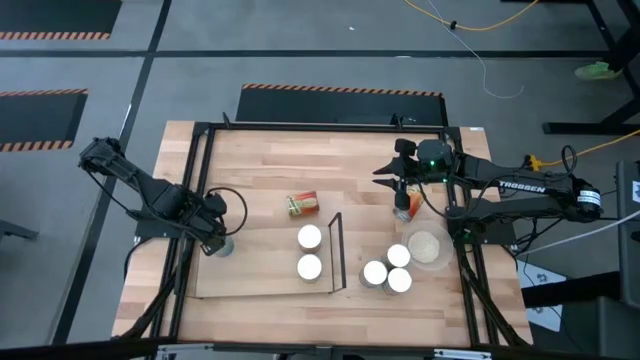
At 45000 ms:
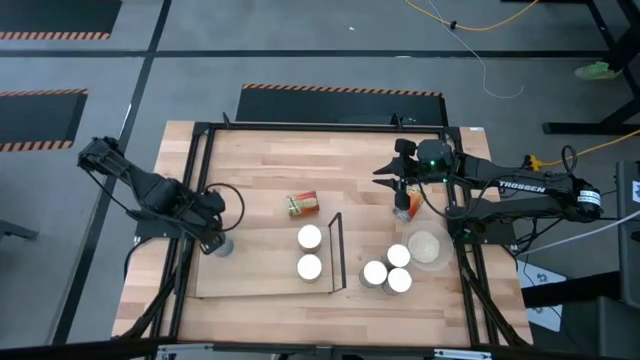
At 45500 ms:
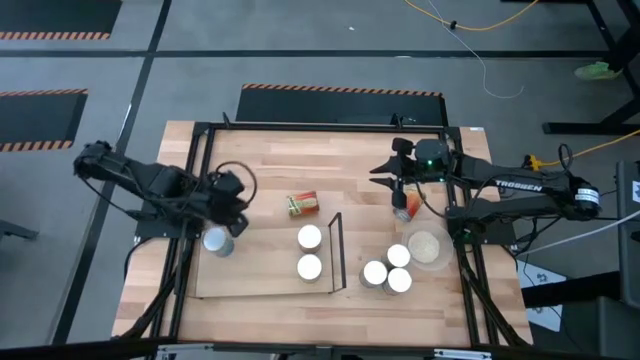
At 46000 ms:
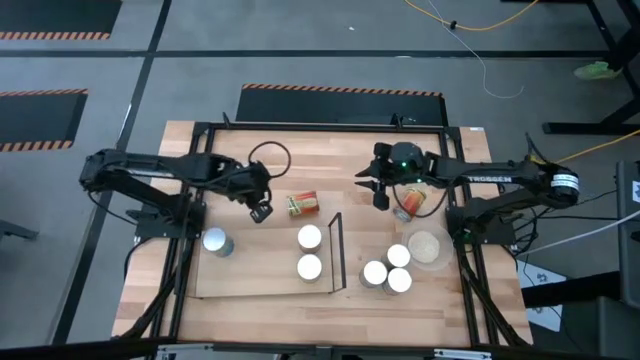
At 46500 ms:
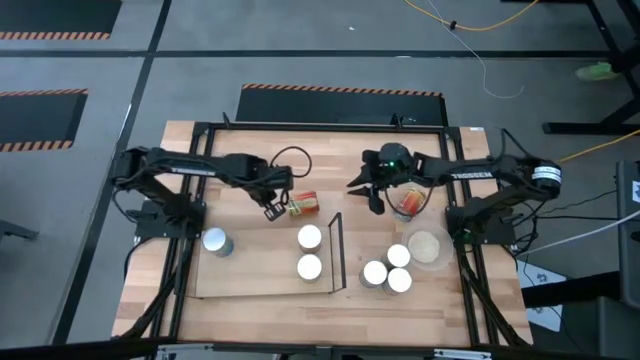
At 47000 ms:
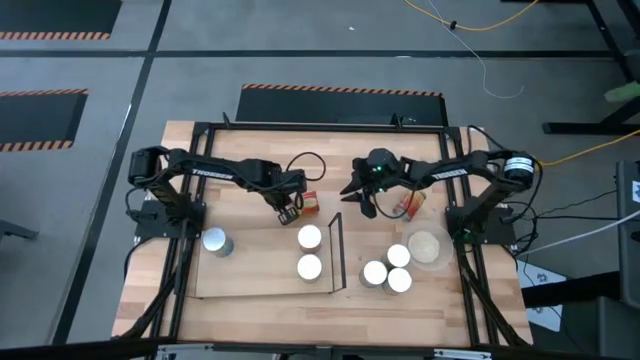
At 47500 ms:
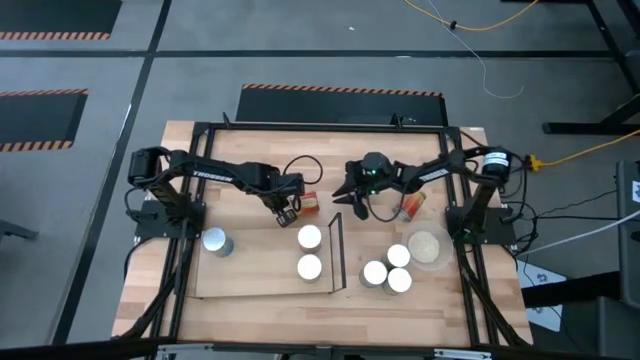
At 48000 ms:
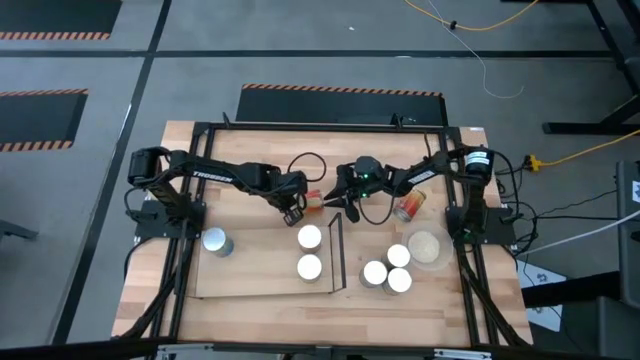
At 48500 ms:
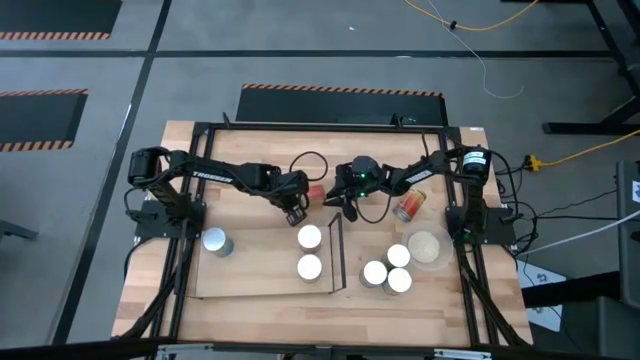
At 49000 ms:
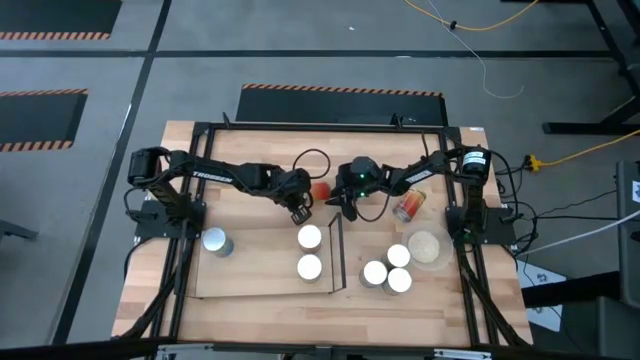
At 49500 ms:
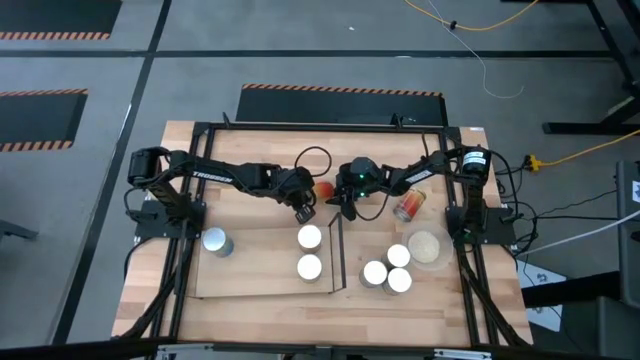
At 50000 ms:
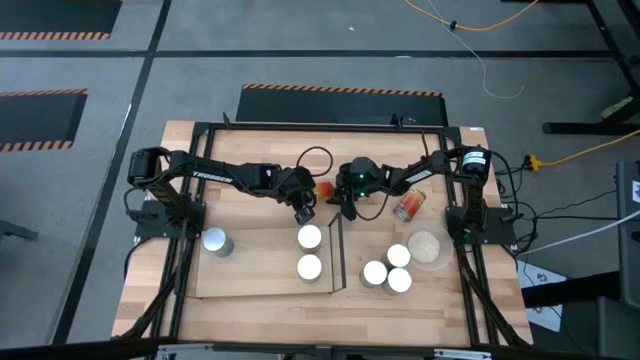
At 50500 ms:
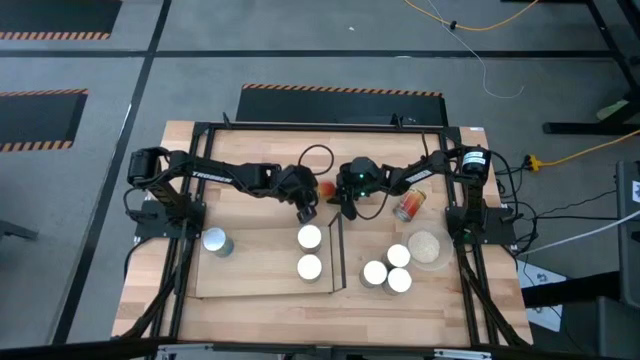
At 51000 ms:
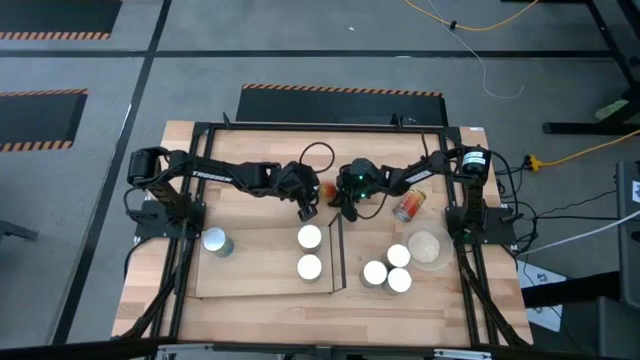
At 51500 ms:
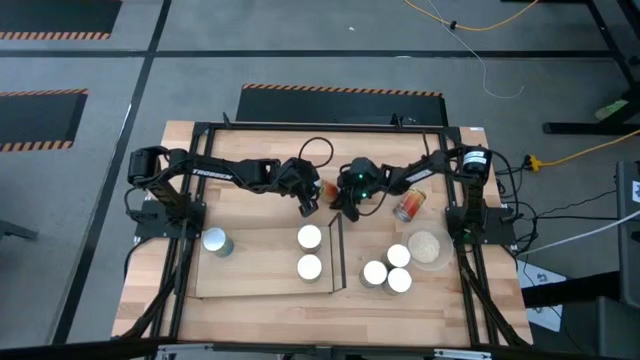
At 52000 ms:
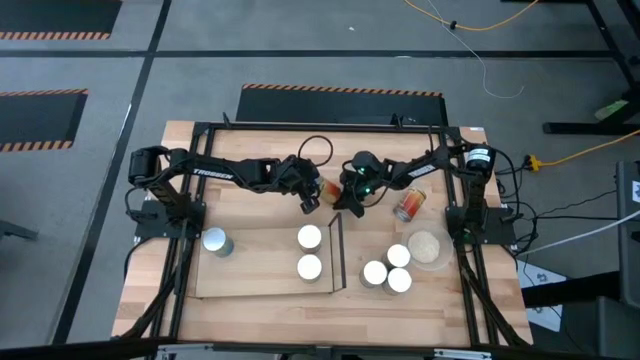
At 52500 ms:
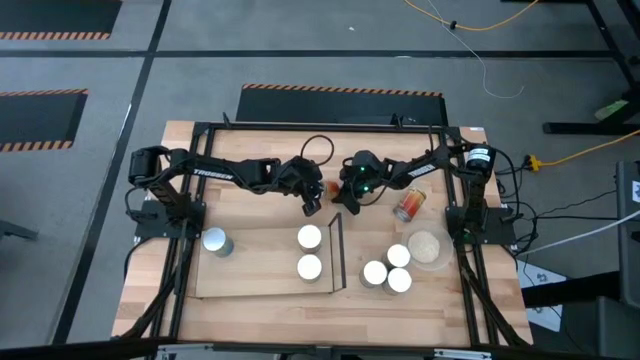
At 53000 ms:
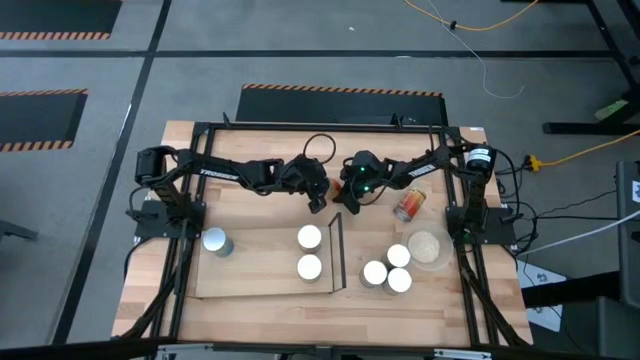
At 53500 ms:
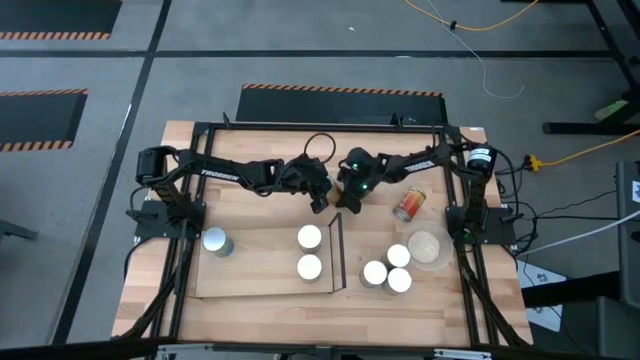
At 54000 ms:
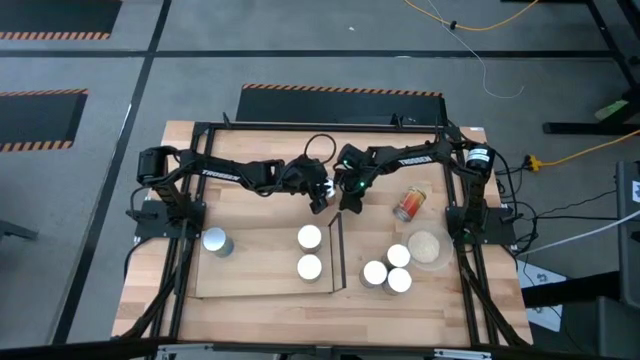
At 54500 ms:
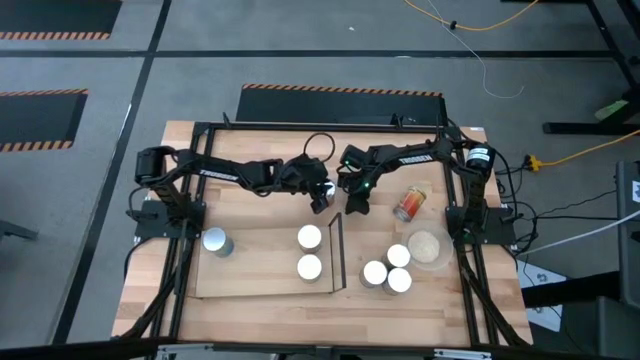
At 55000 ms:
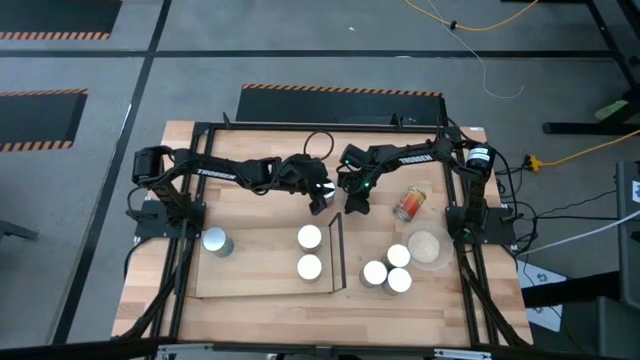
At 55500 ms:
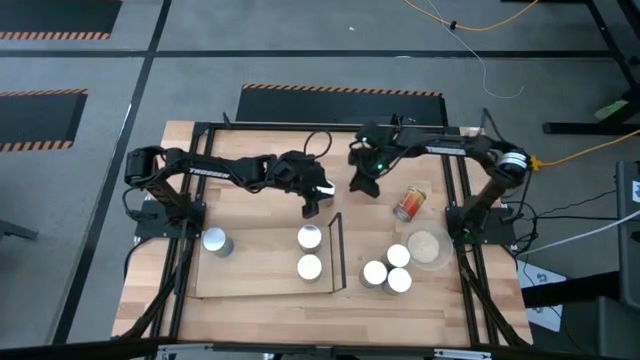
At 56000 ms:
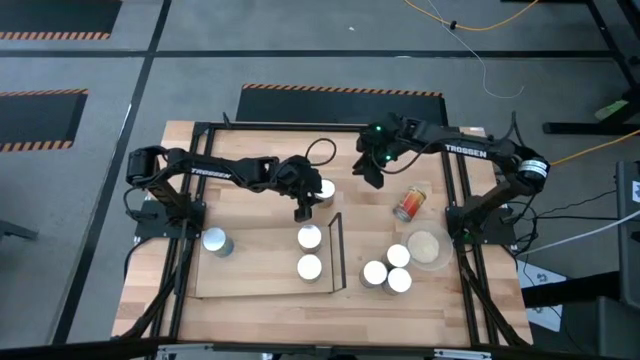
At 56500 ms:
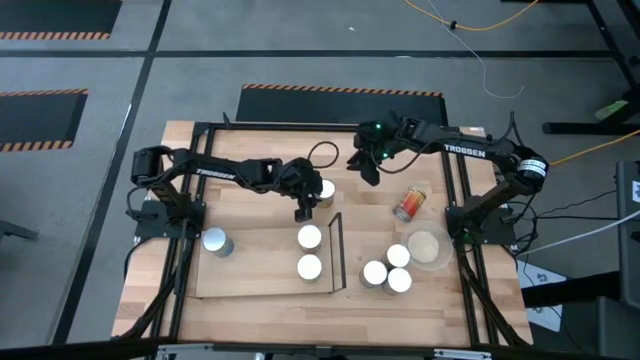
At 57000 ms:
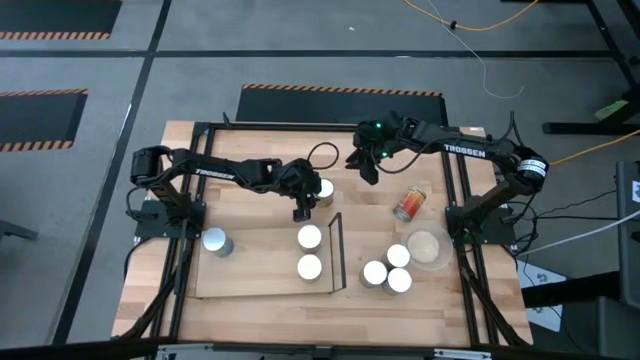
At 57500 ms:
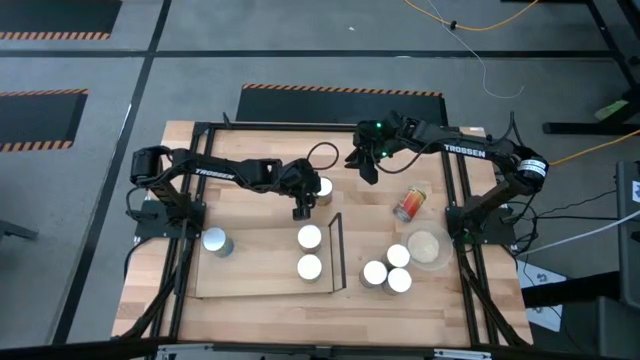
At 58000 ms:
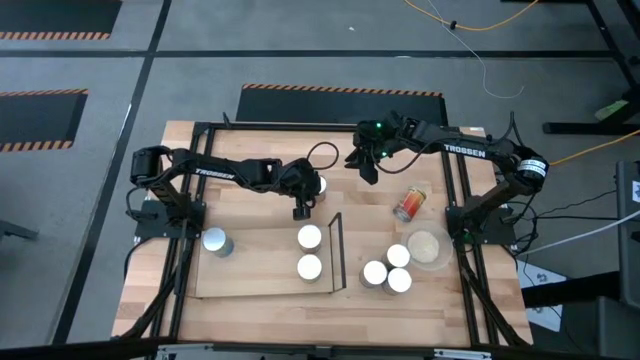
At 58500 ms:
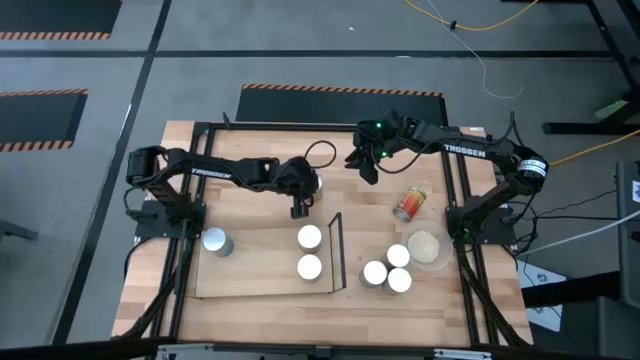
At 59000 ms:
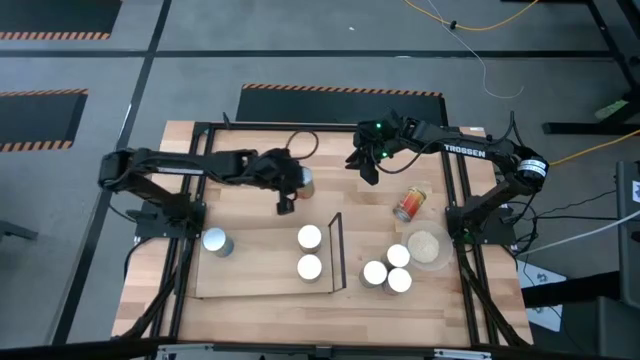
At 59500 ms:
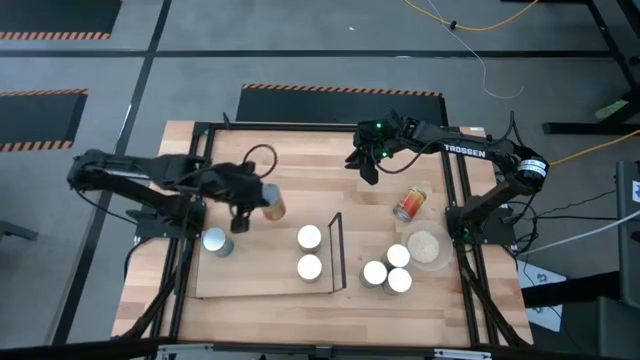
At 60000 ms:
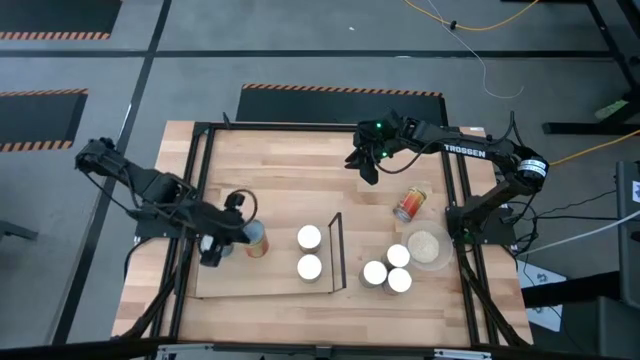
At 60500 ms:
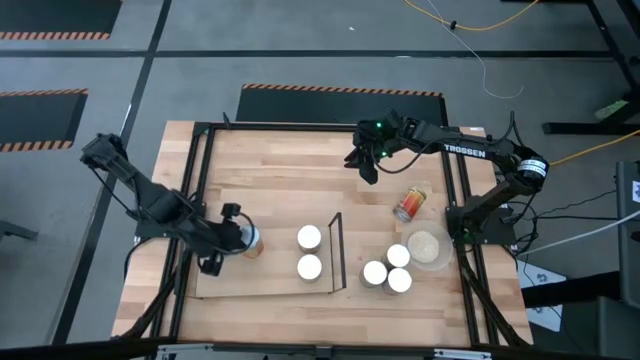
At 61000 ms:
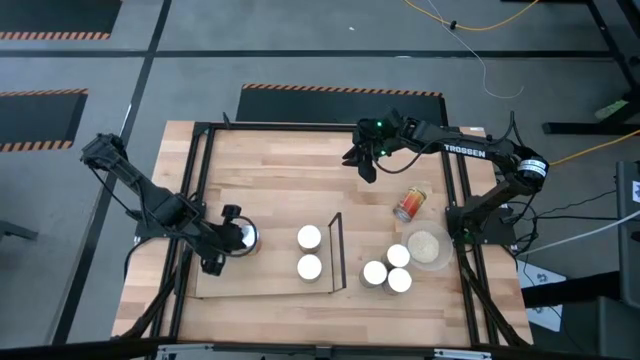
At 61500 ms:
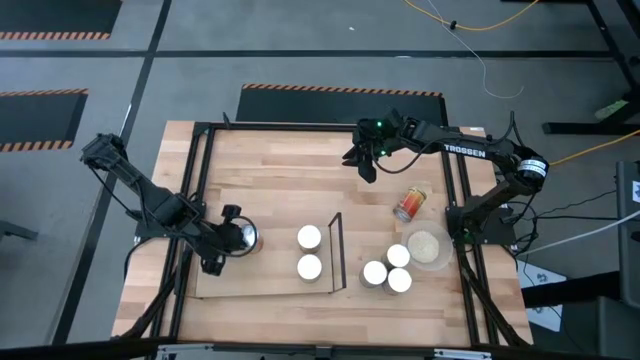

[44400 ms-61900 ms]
Task: Pick and place cans onto a shelf
Put the pineapple can on the shelf

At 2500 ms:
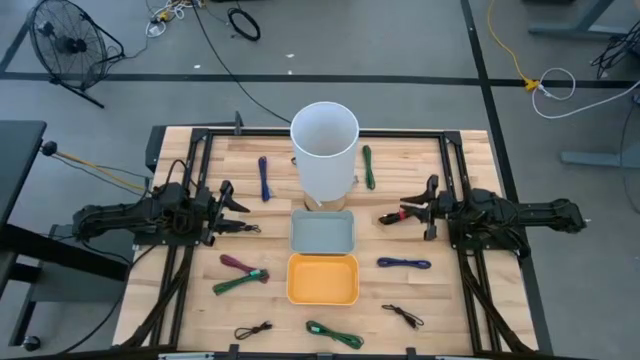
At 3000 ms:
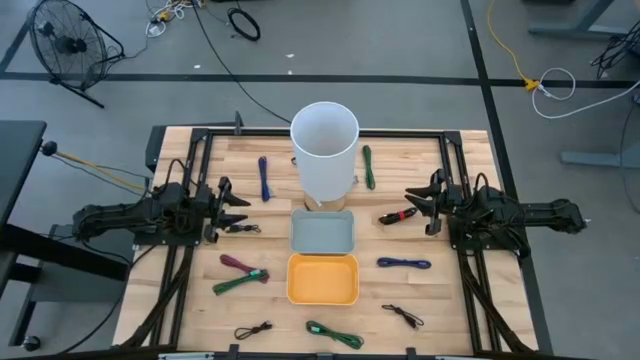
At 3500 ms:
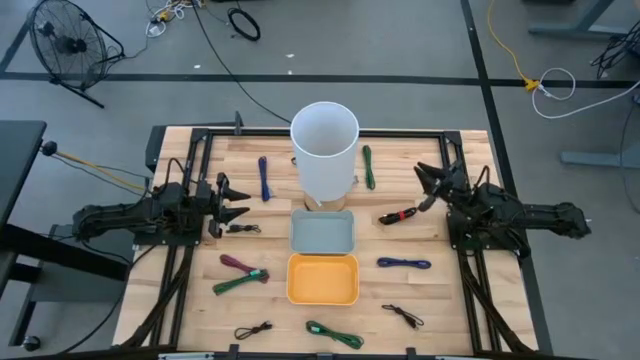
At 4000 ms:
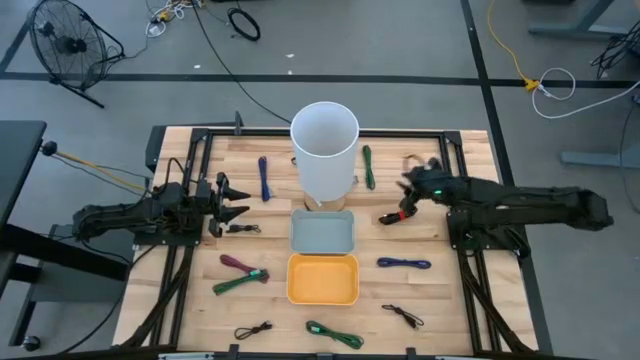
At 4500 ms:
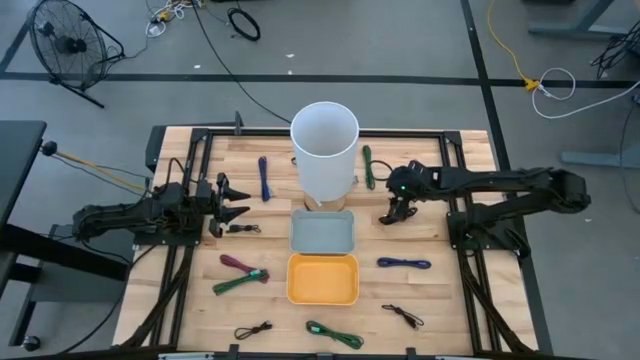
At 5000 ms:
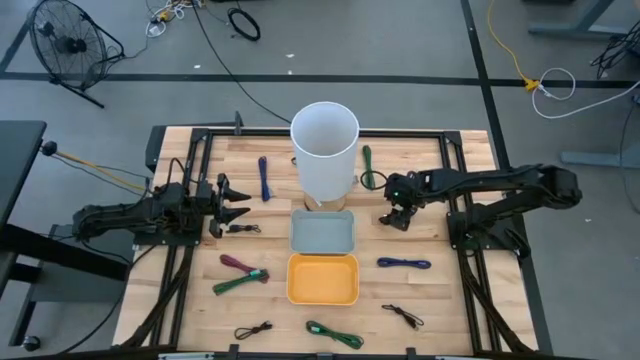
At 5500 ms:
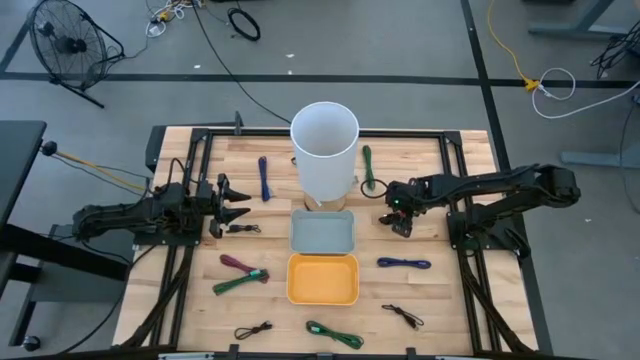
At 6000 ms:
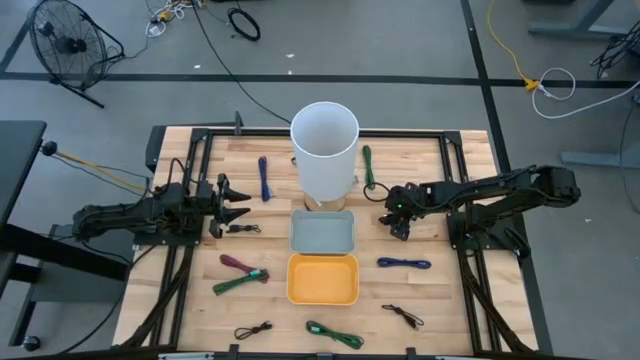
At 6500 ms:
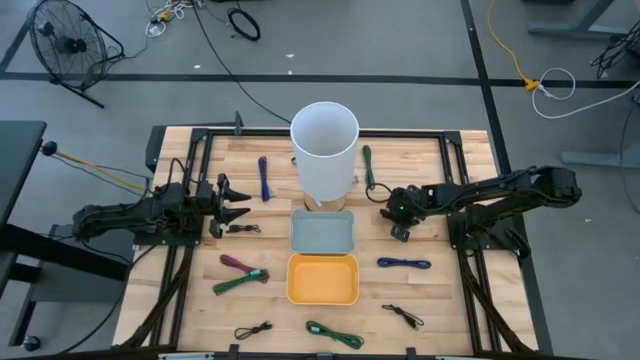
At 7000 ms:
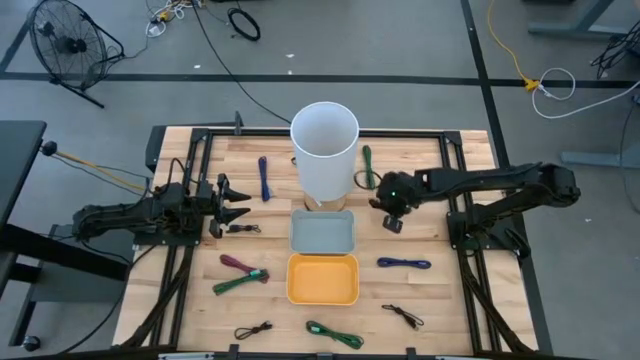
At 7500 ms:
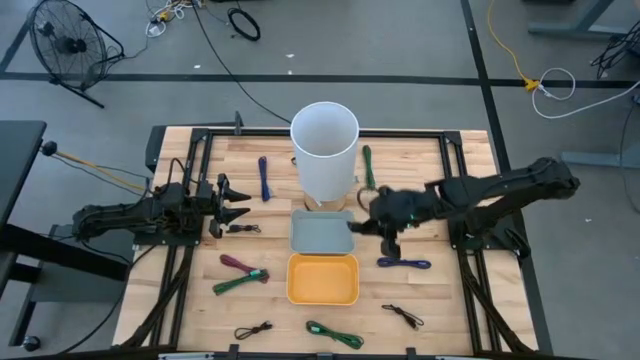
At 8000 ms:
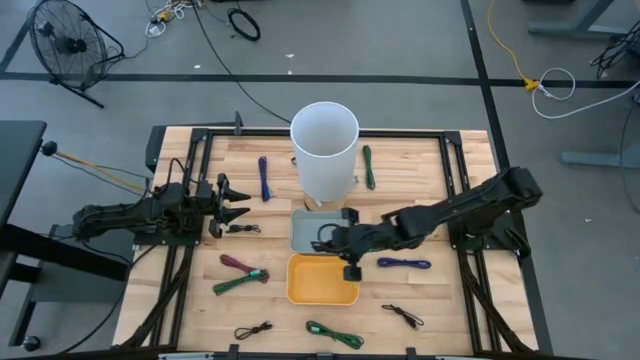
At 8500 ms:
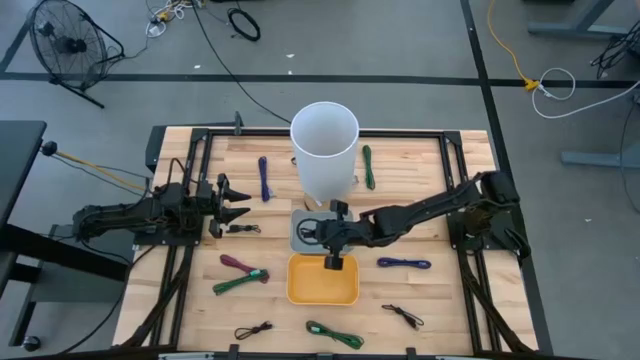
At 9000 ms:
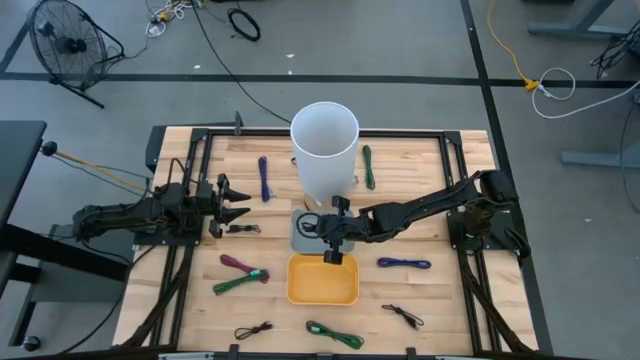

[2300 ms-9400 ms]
Task: Pick & Place USB Port
Put the black charger cable into the gray bin
